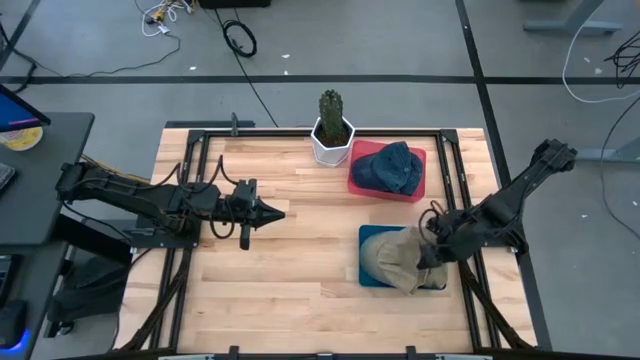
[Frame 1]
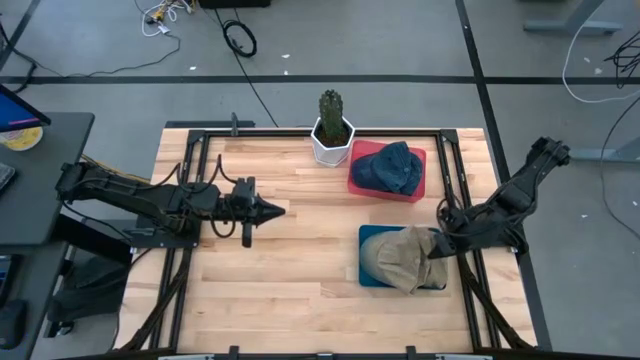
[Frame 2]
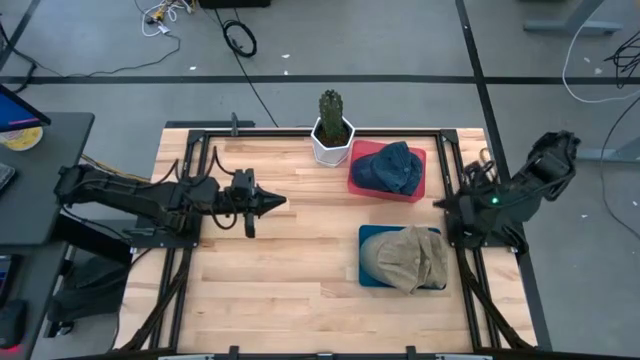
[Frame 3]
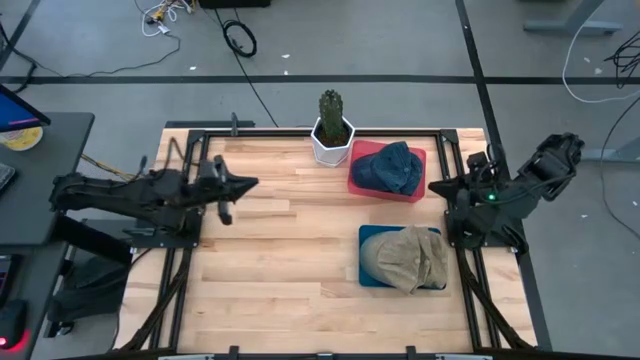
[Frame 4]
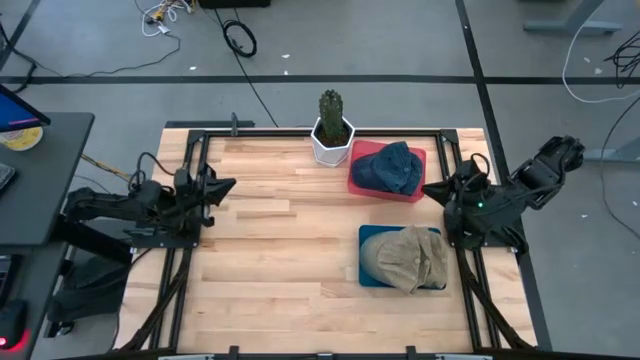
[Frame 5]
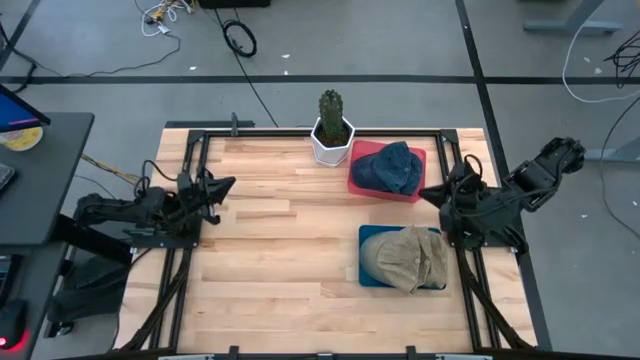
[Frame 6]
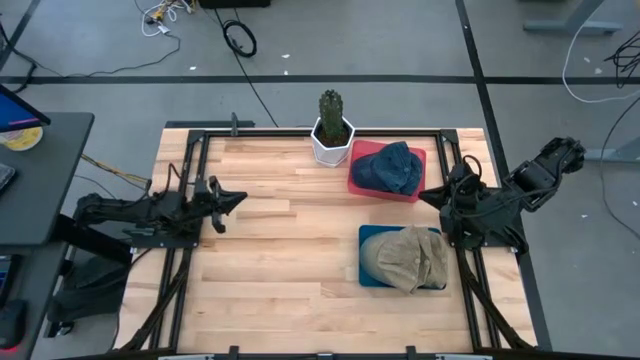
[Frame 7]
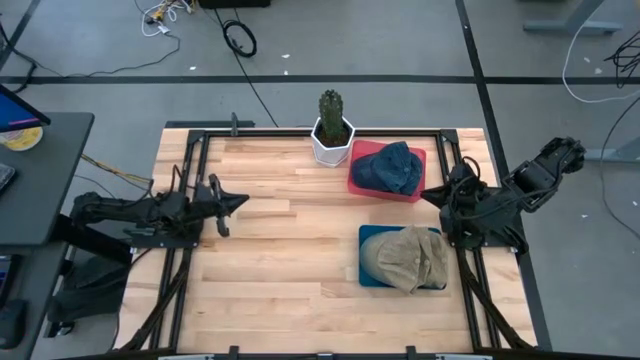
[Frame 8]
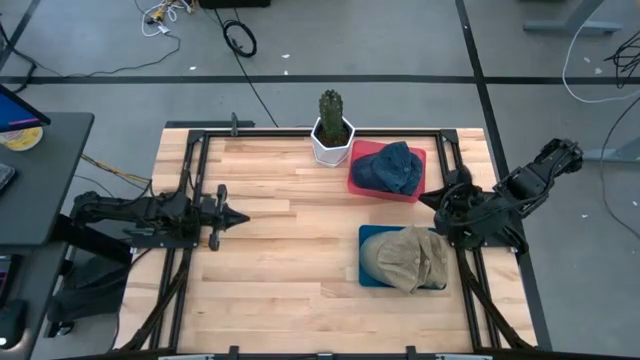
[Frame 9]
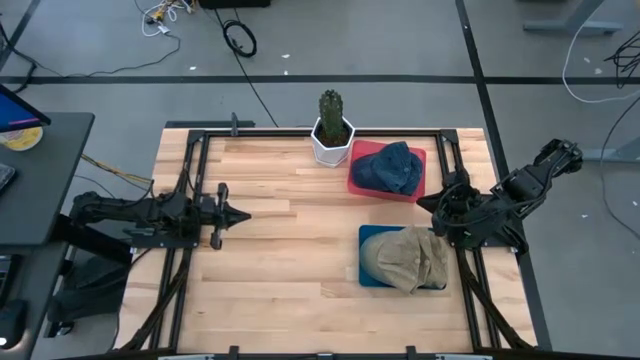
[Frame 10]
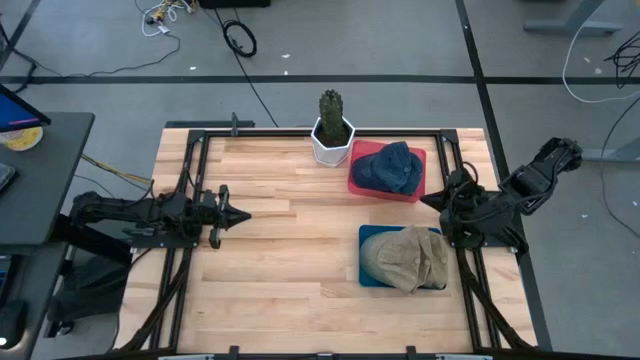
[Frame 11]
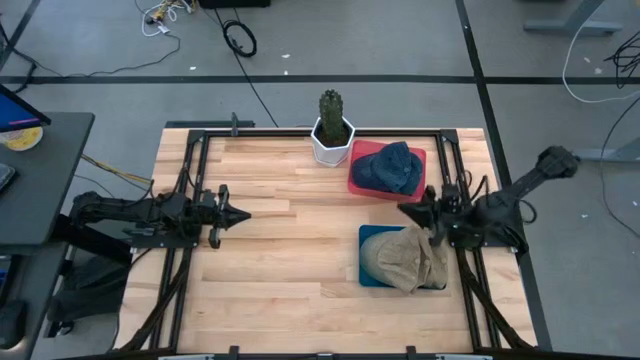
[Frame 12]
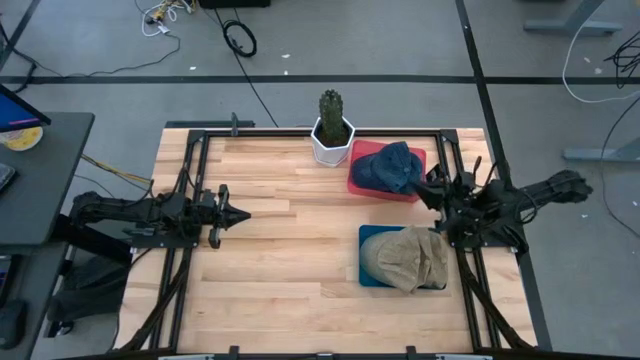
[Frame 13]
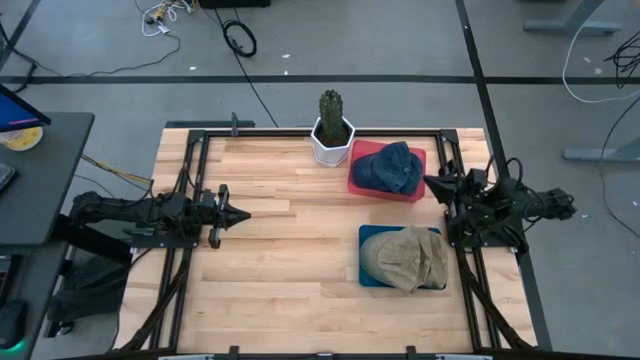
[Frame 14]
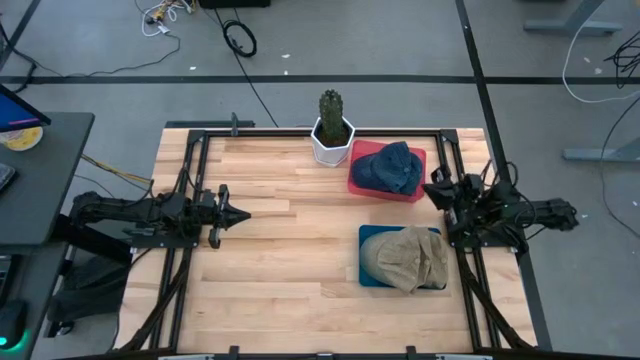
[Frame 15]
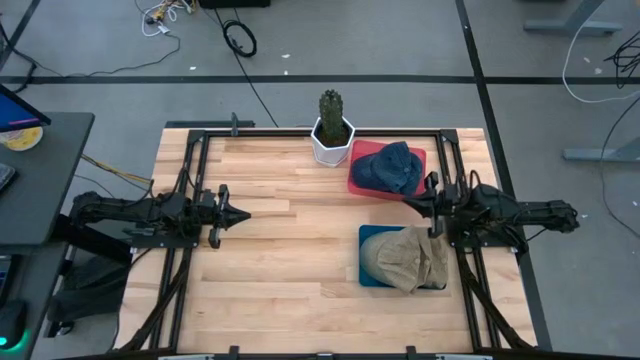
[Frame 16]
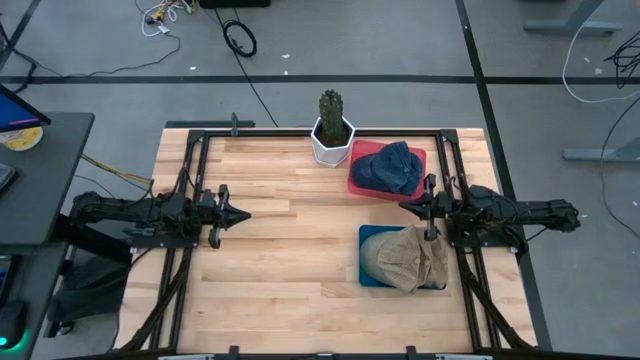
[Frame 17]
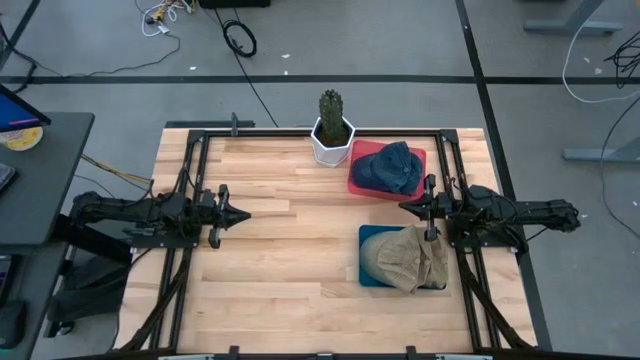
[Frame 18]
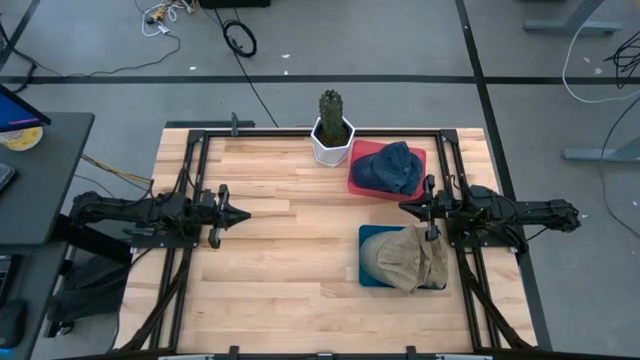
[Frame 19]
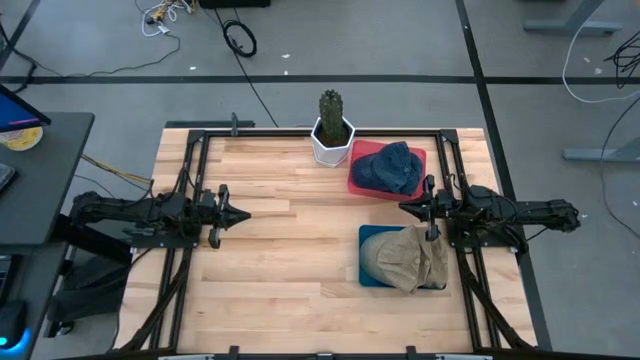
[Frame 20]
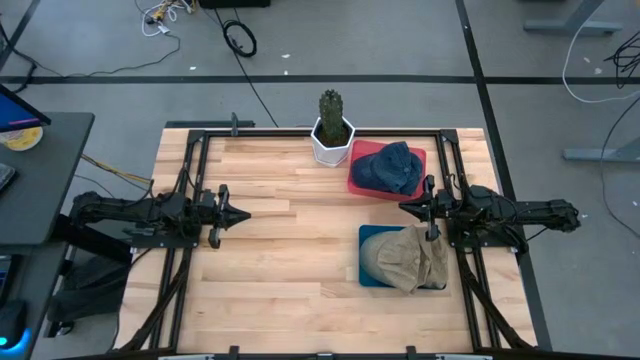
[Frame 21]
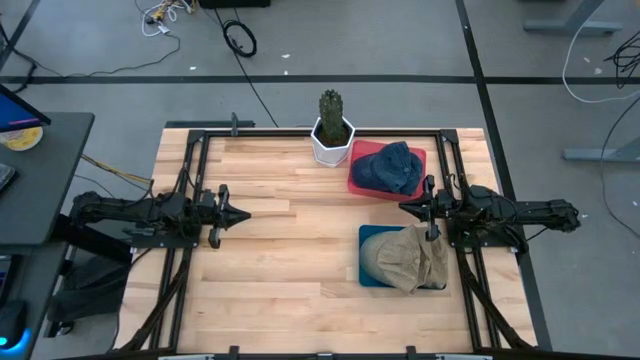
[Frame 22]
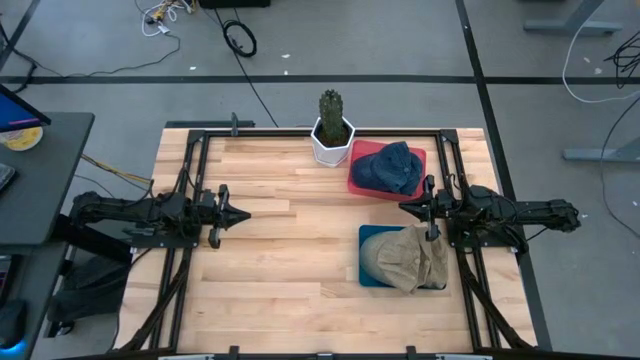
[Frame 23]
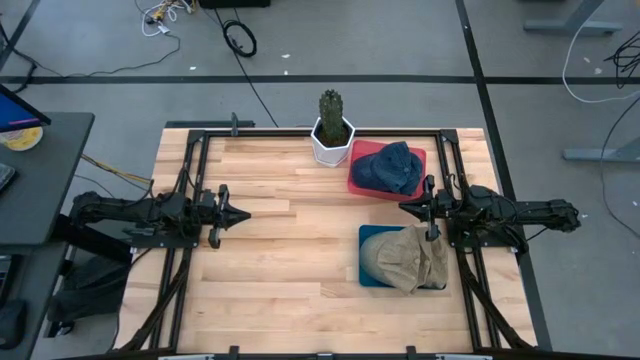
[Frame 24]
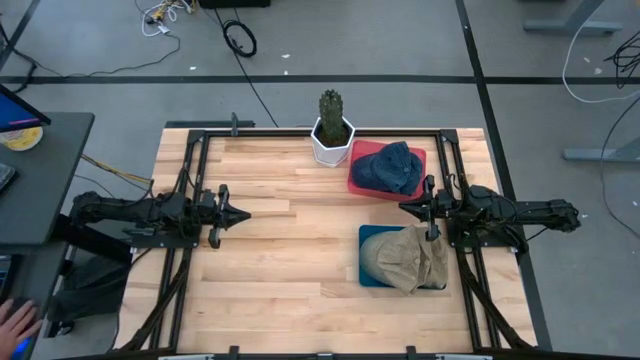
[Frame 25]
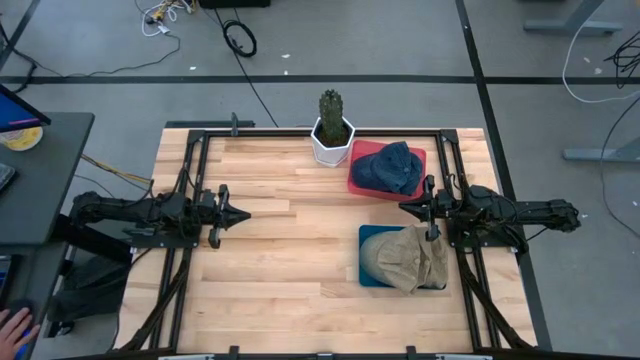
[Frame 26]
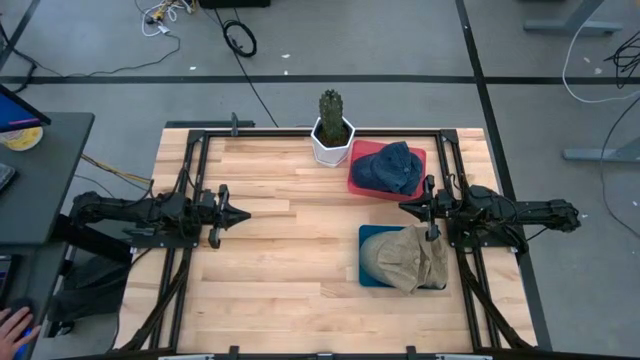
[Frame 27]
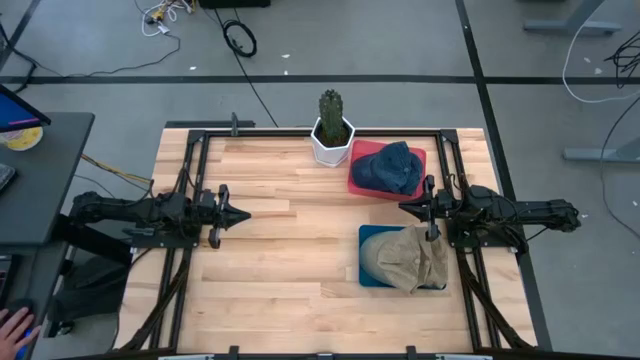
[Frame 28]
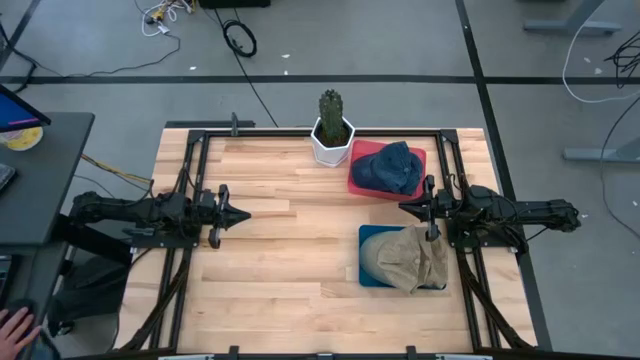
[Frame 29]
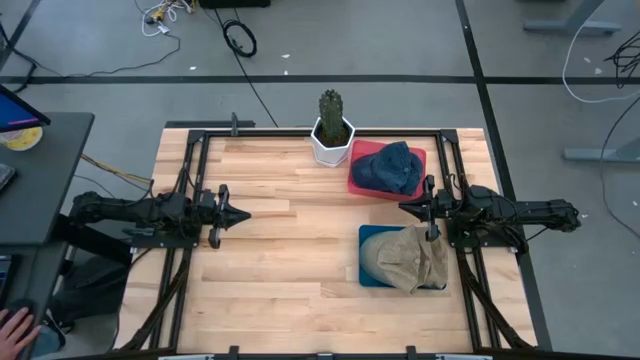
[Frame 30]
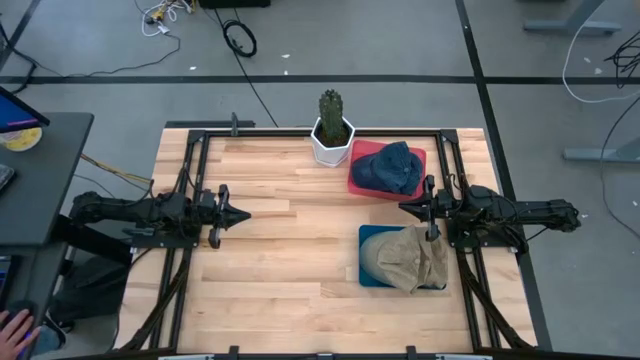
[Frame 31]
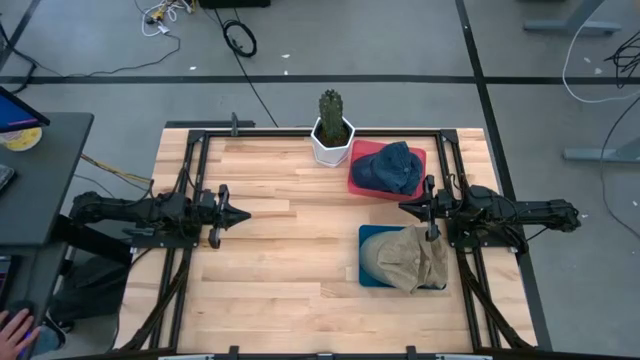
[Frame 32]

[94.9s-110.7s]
Task: Pick & Place hat
Return to Home Position

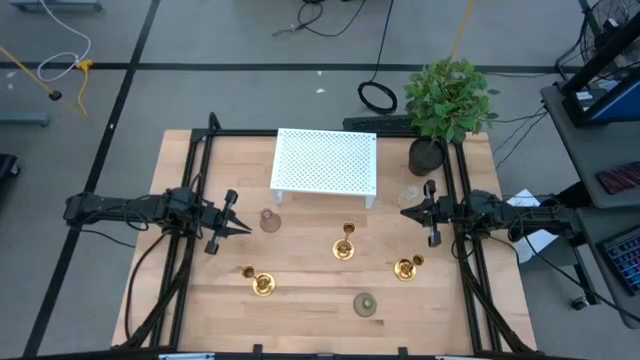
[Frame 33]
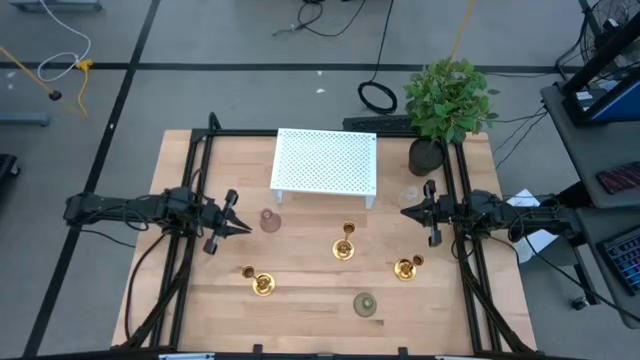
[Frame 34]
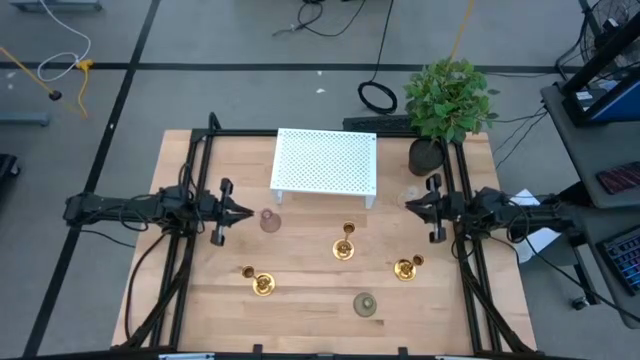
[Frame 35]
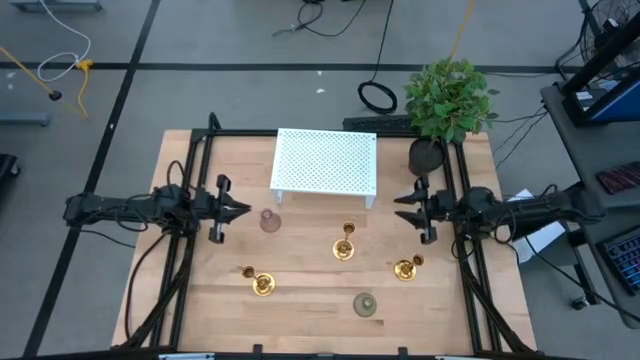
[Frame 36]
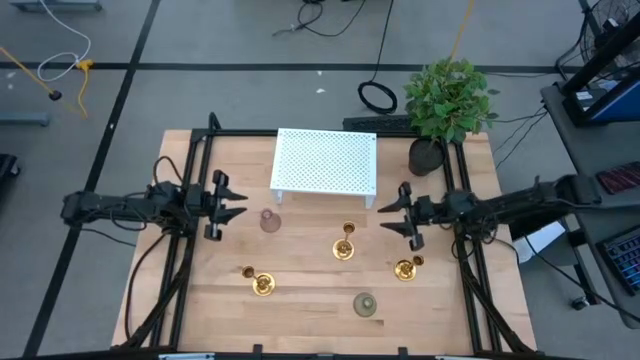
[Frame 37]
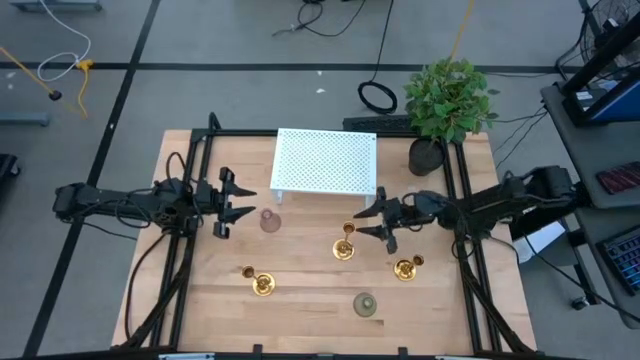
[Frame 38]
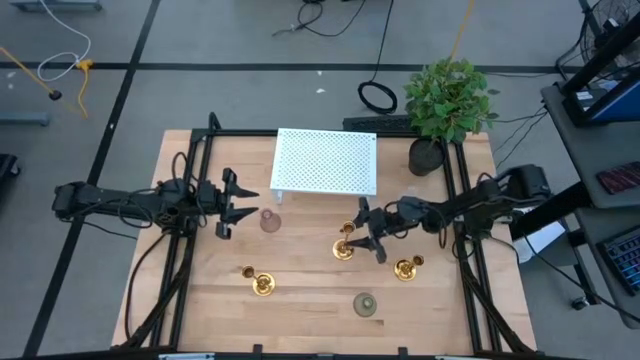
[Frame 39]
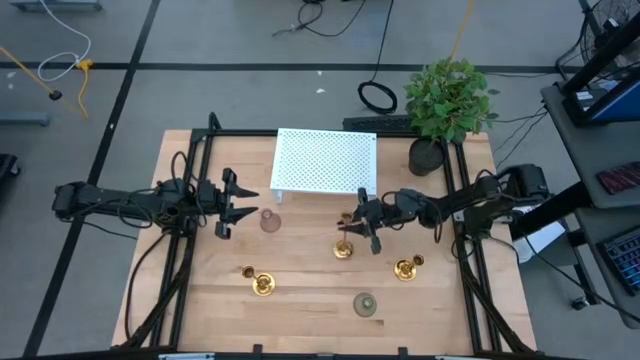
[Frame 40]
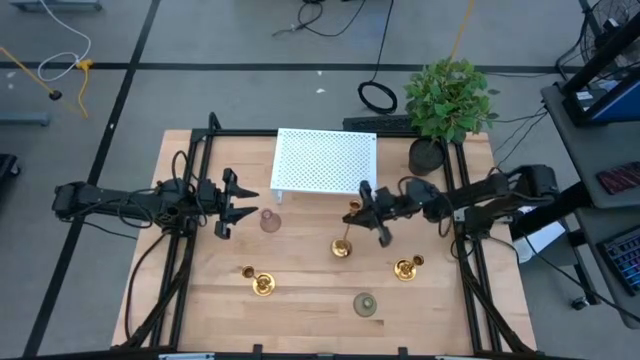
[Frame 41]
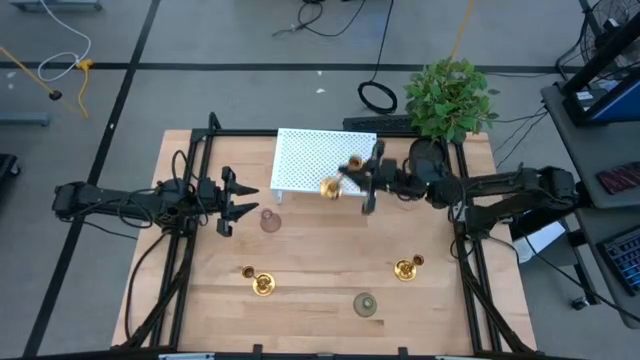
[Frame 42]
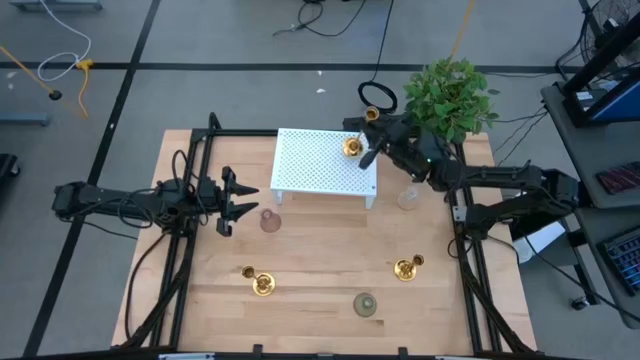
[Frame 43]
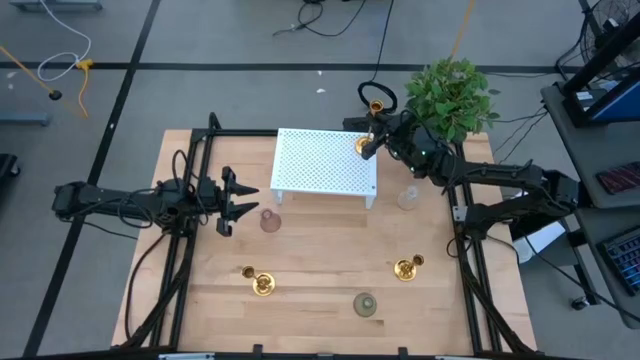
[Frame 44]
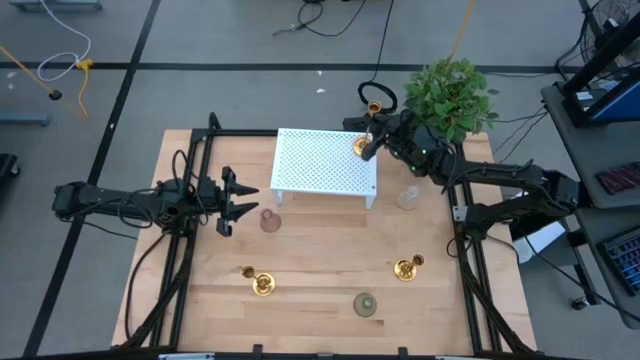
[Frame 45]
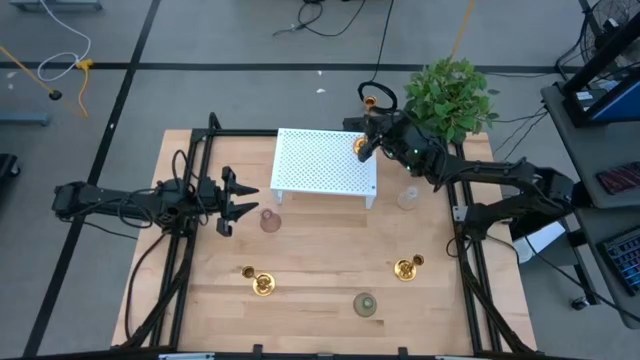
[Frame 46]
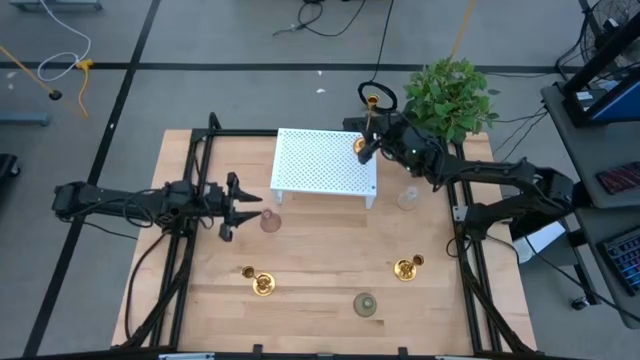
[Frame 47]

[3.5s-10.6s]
Task: Pick & Place candle stick holders
Put the top right long gold candle holder on the shelf
